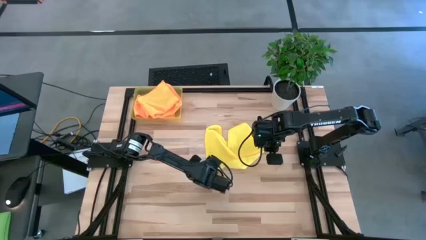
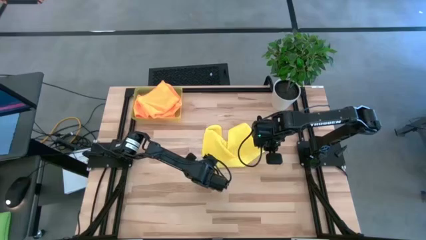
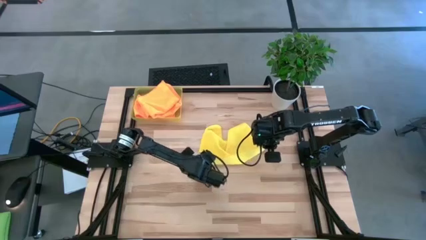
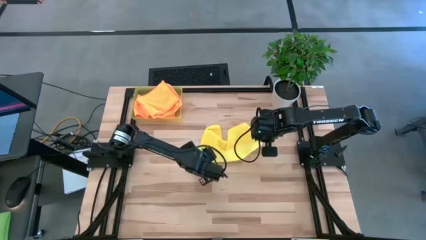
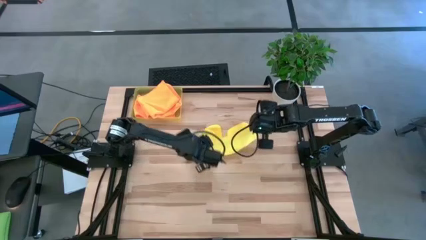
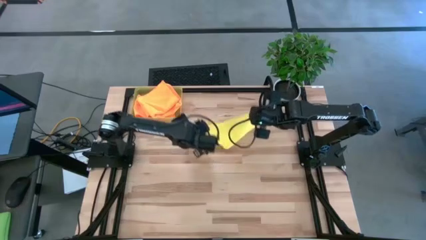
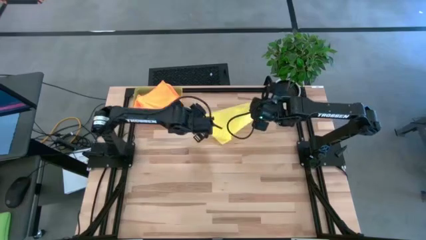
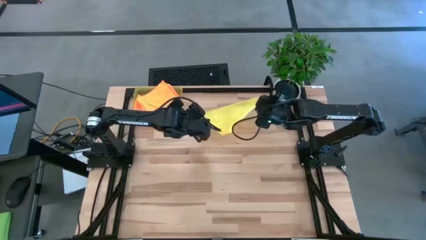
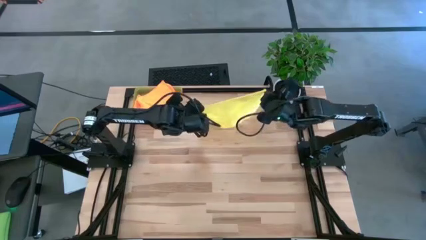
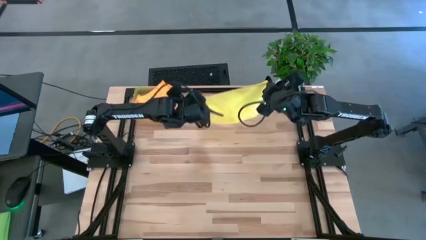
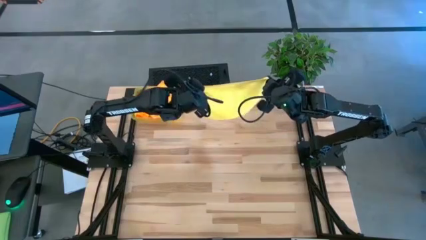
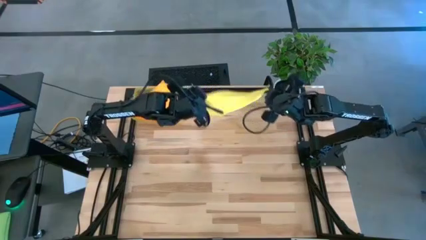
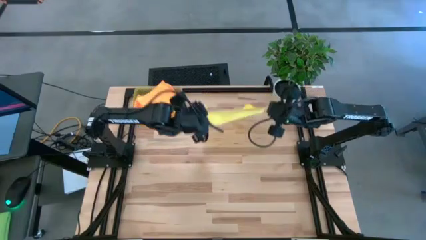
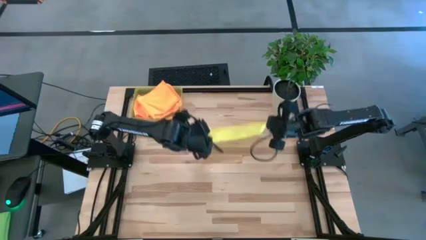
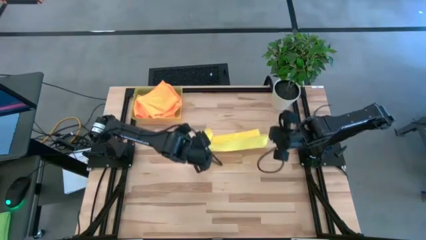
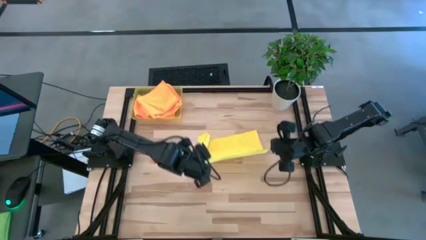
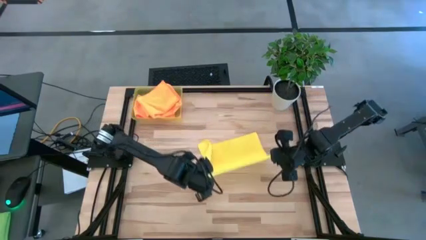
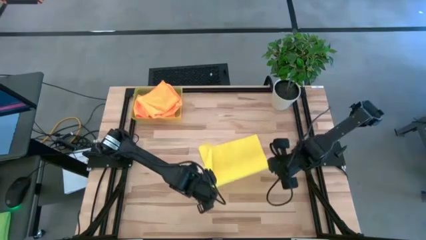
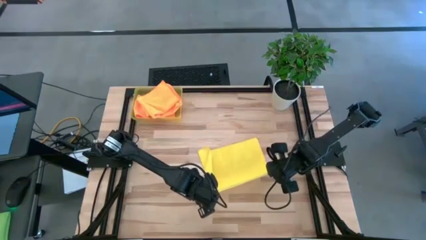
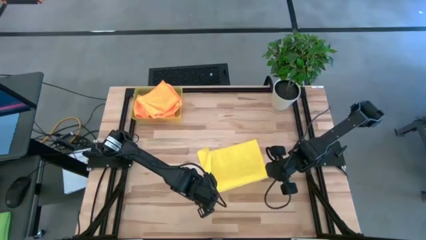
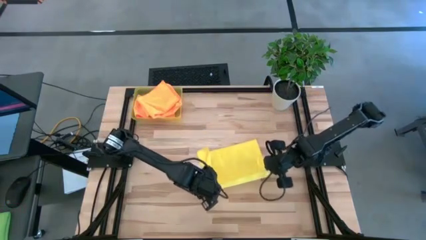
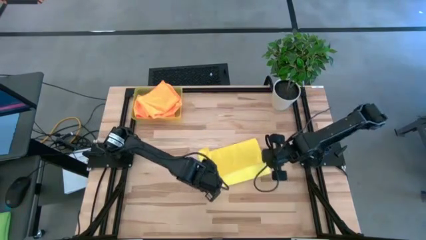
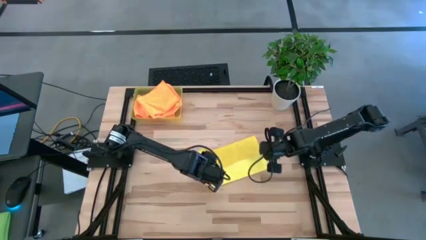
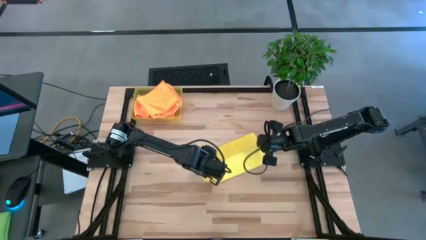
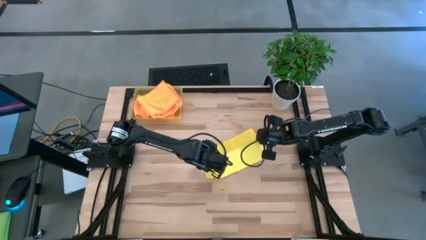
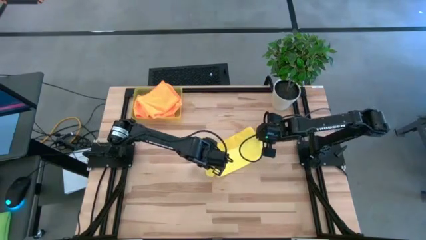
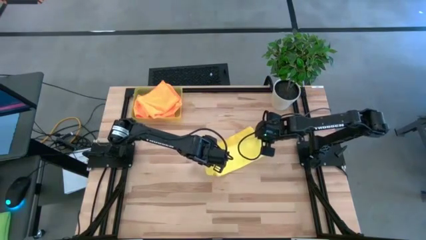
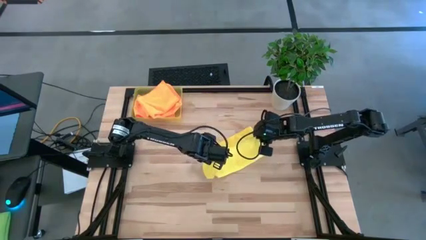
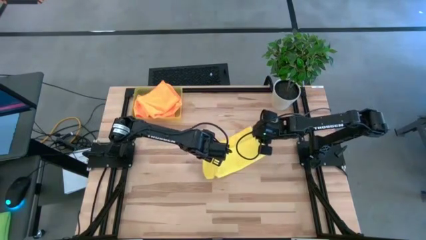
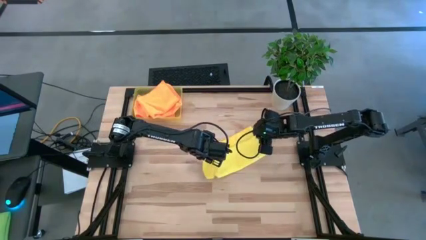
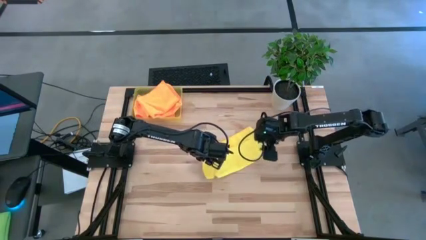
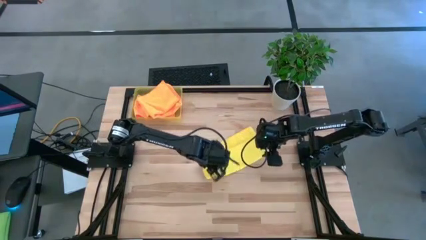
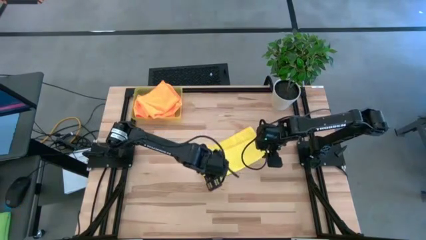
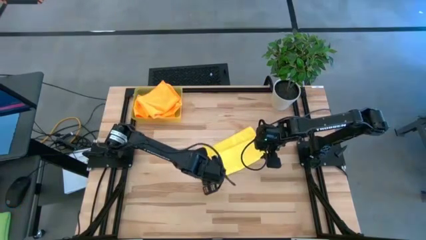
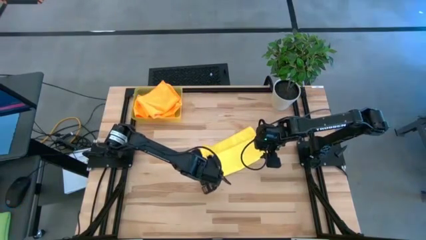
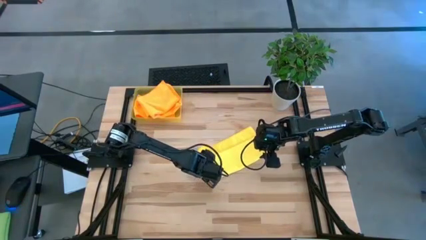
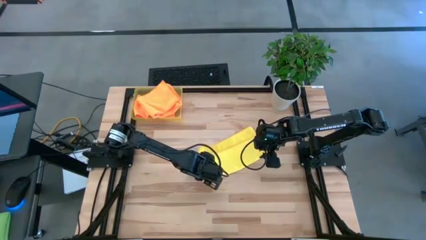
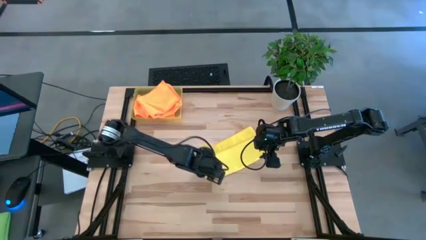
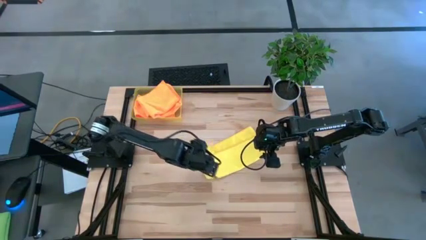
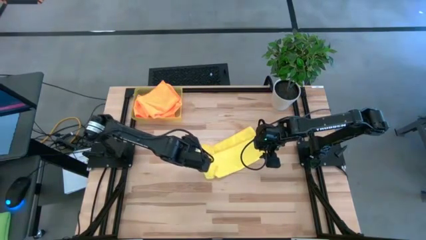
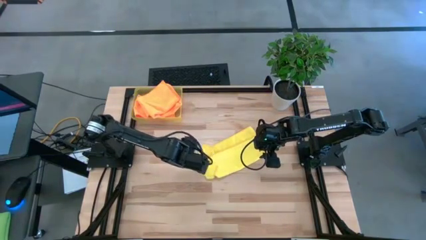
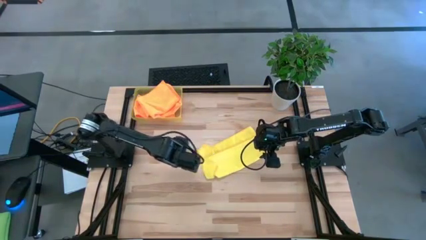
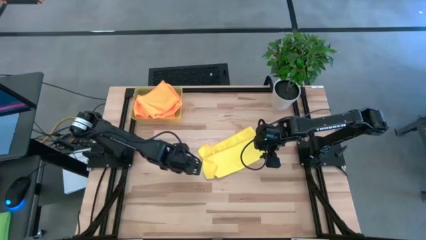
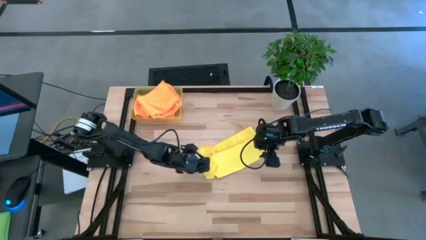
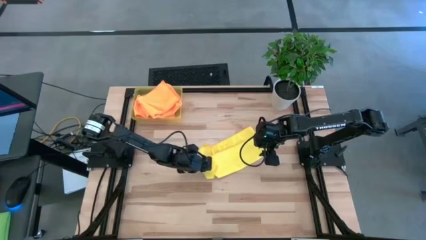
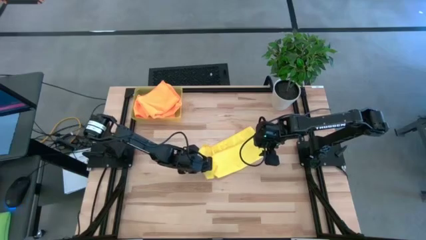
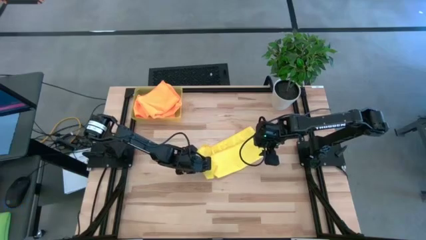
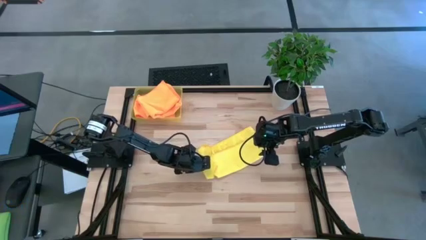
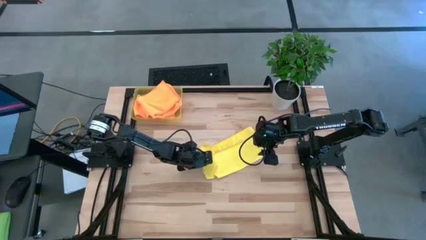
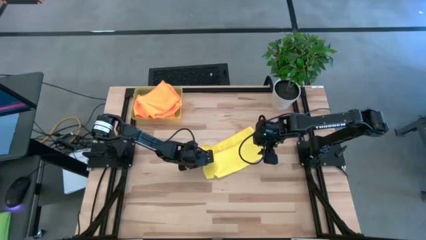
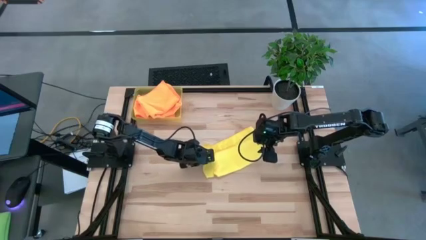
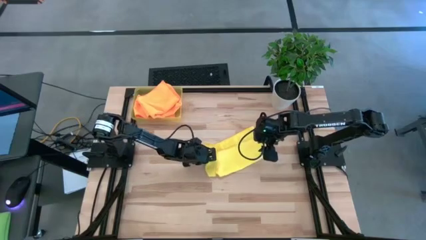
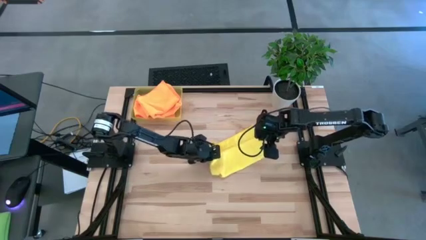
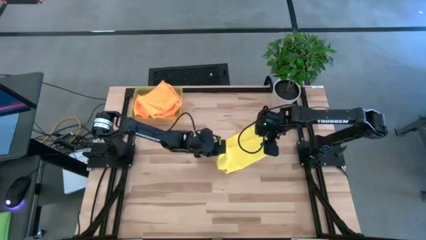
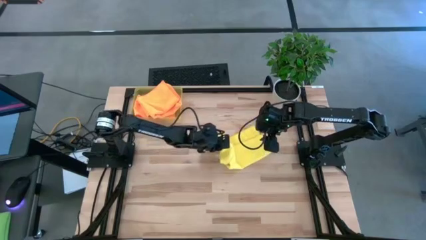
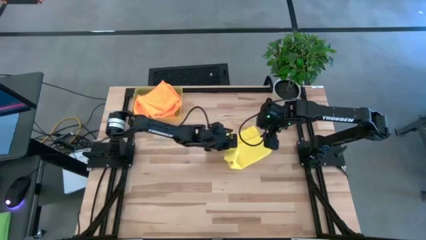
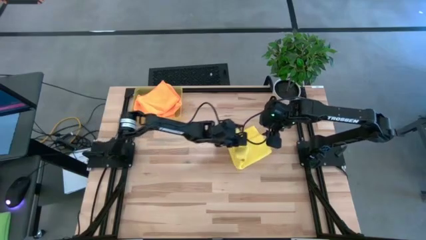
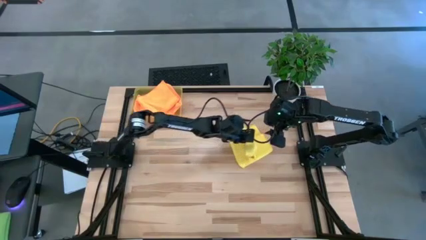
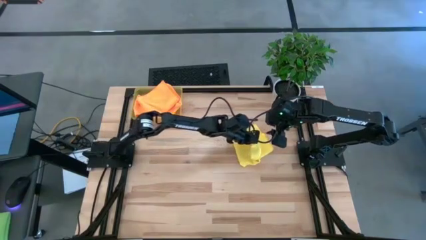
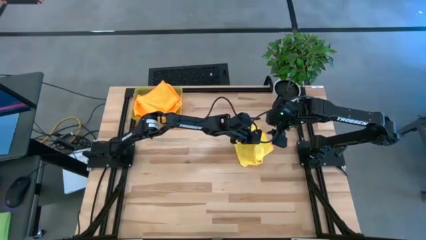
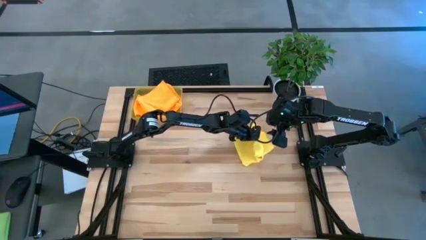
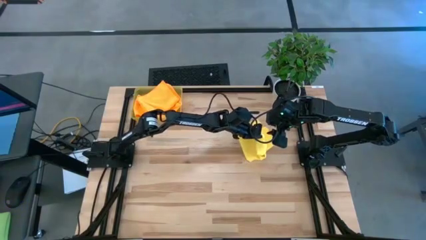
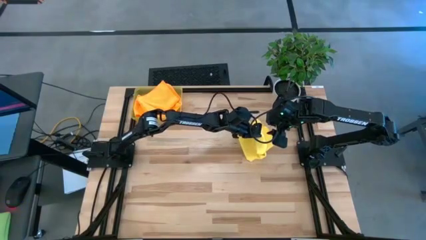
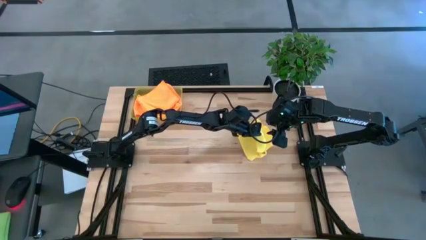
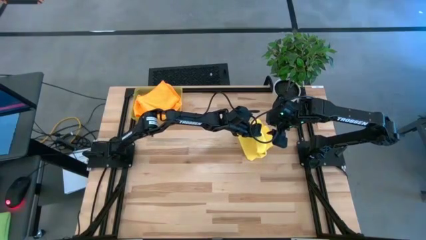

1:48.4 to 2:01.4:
Task: Fold microfiber towels
Fold the yellow microfiber cloth

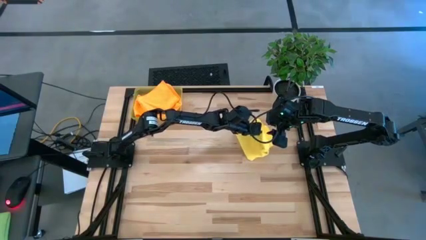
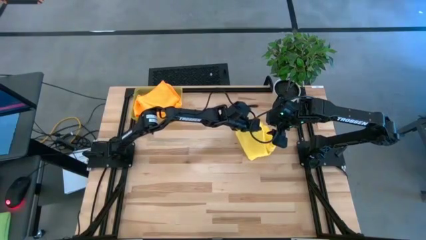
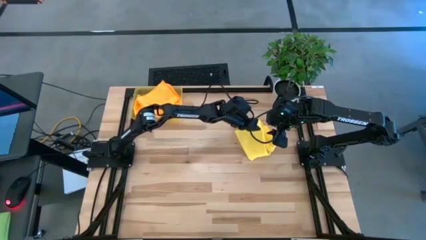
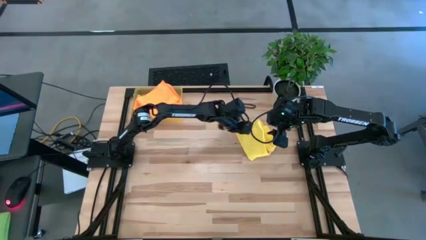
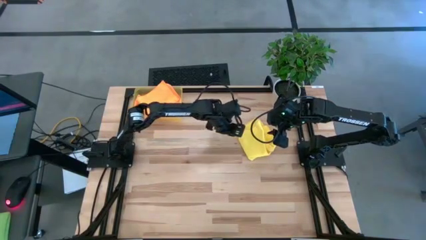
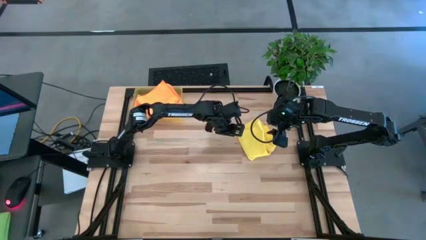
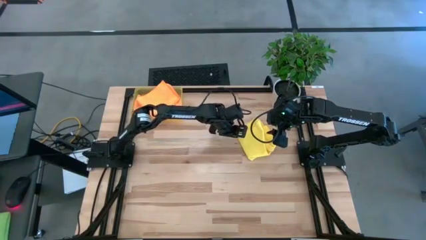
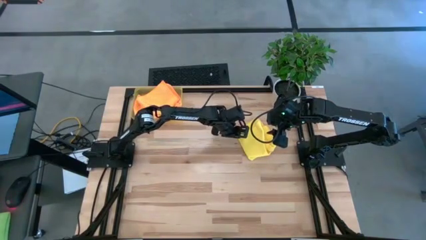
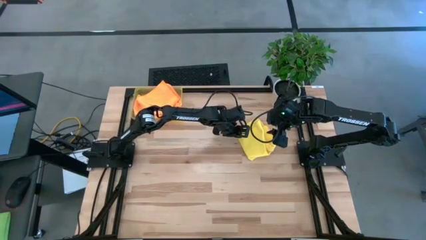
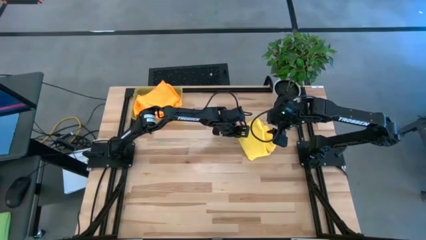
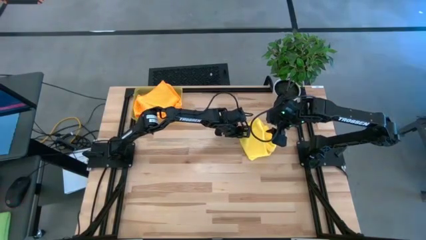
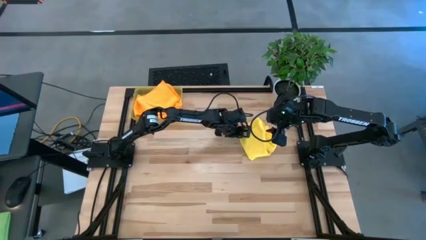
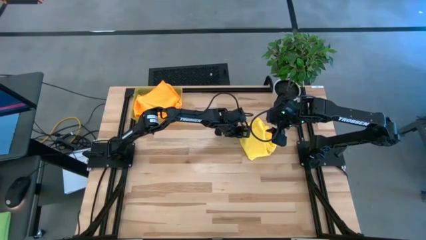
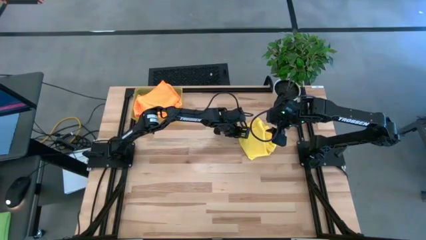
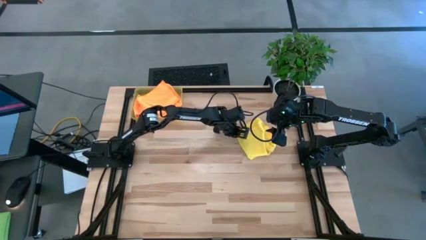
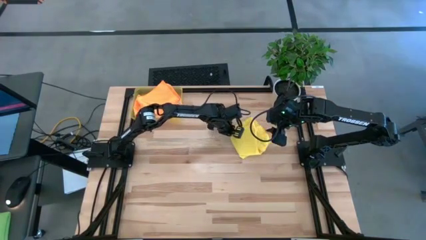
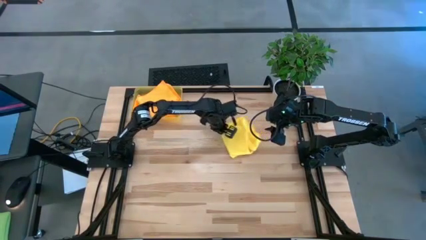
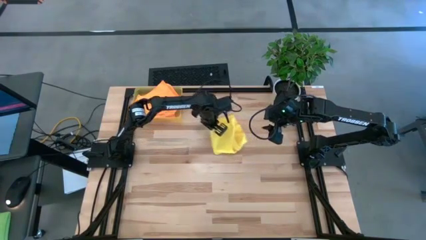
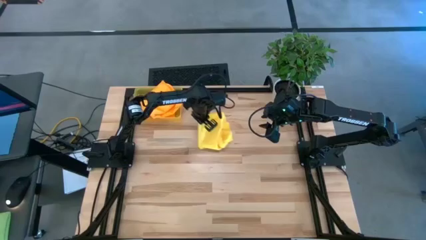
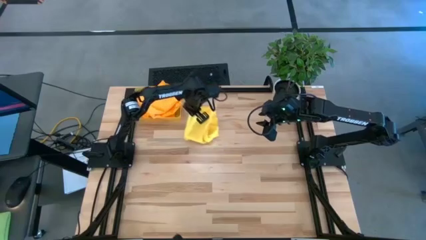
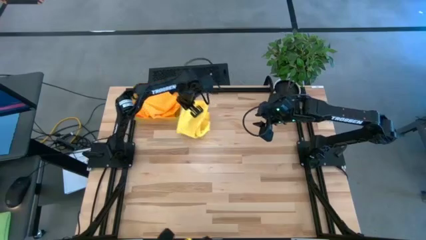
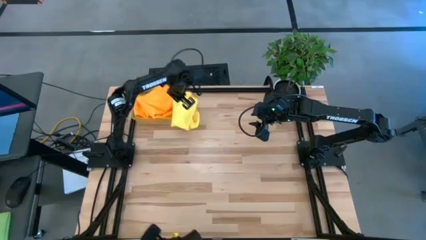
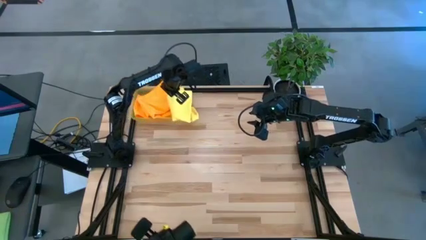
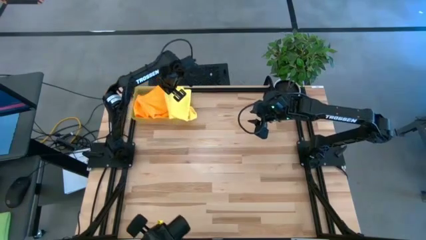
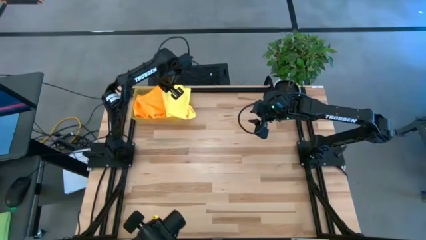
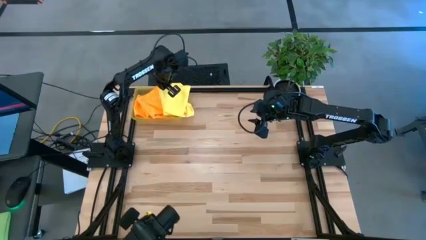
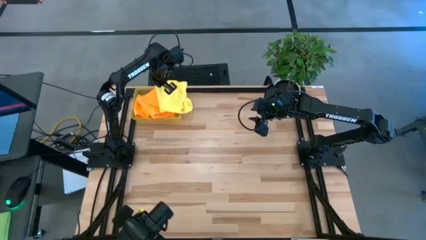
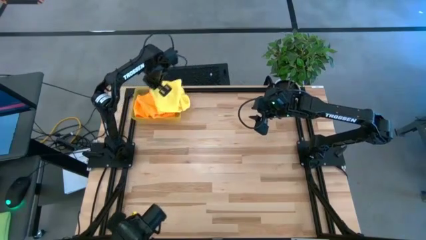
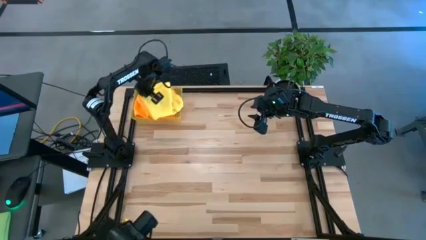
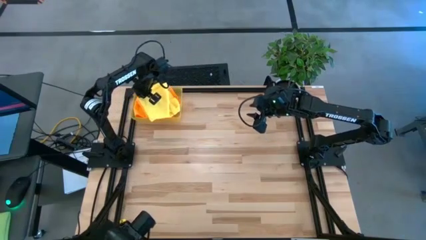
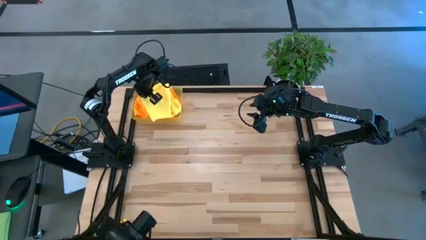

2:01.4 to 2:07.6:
Put the folded yellow microfiber cloth into the yellow bin
